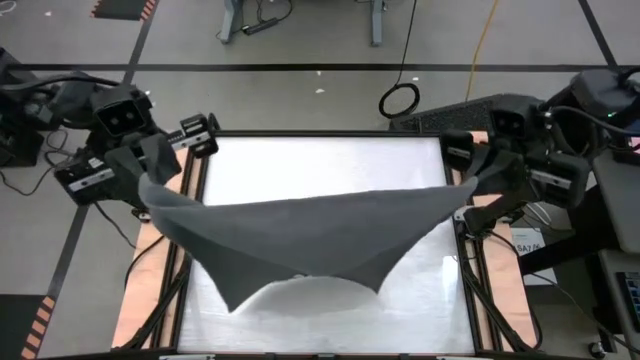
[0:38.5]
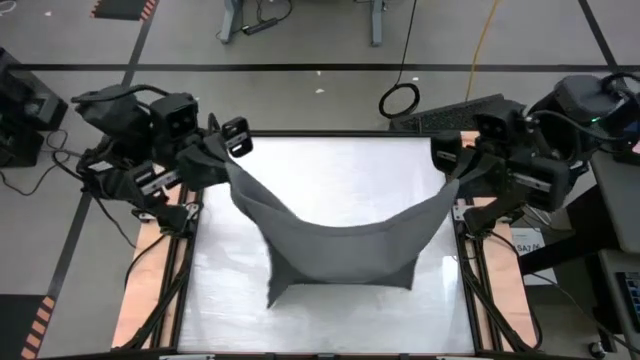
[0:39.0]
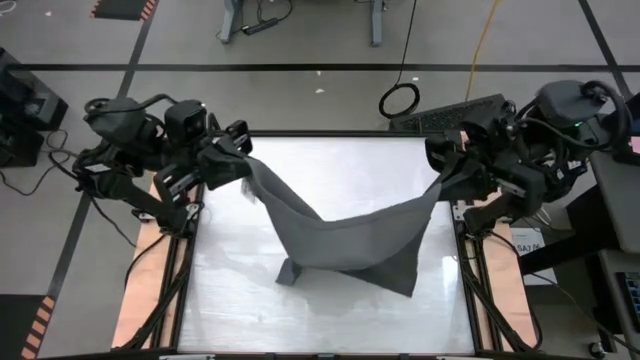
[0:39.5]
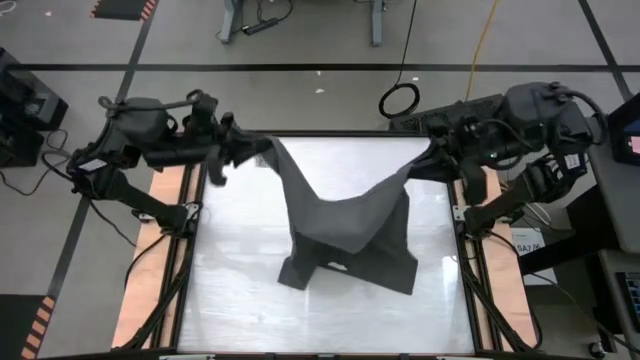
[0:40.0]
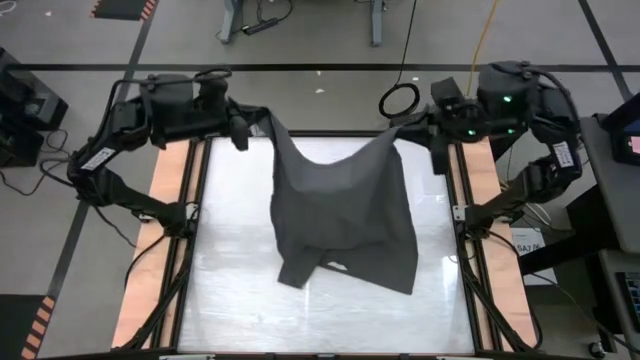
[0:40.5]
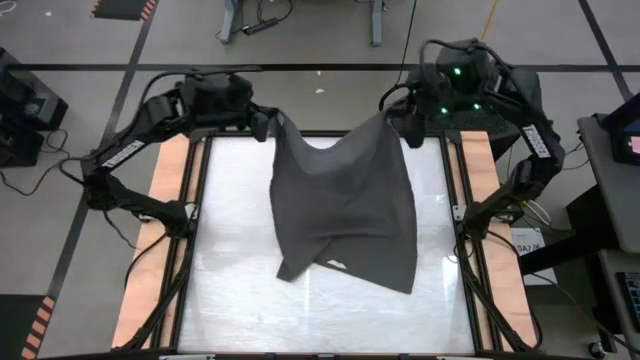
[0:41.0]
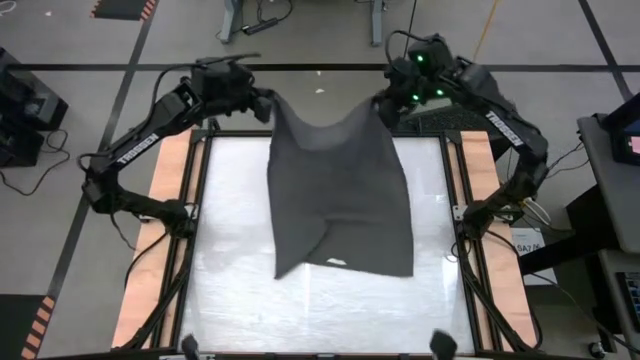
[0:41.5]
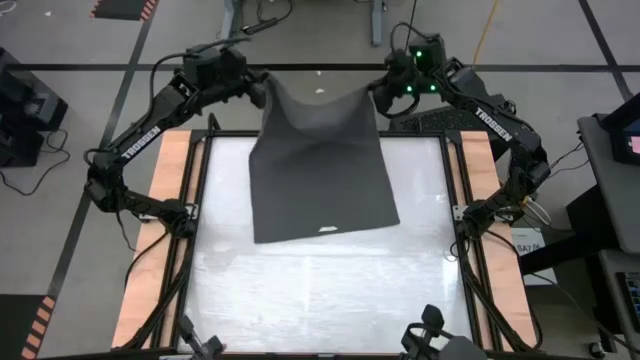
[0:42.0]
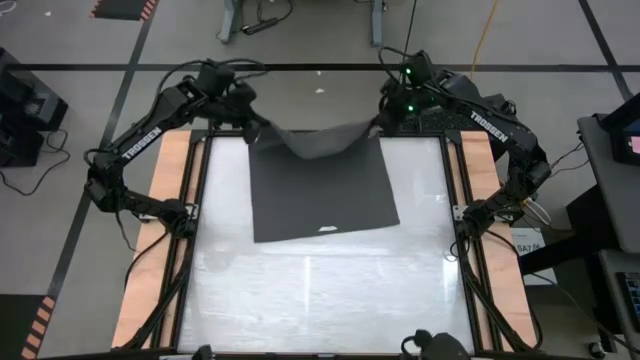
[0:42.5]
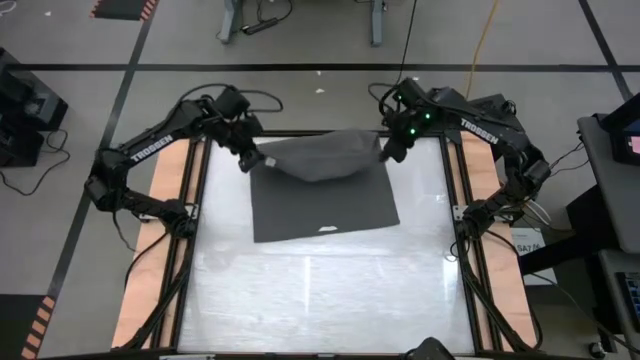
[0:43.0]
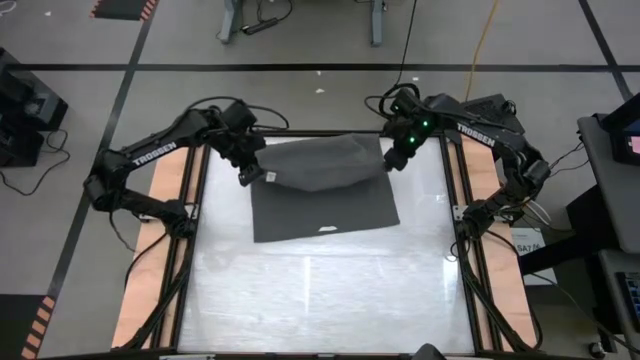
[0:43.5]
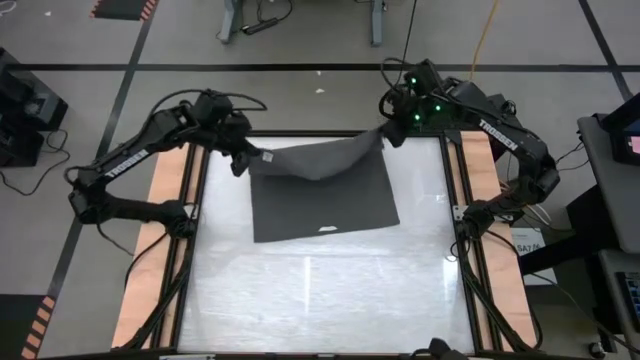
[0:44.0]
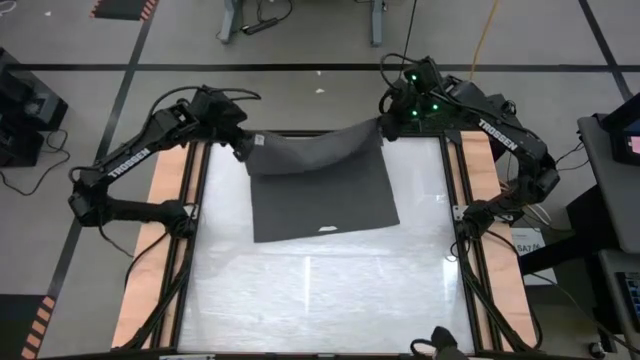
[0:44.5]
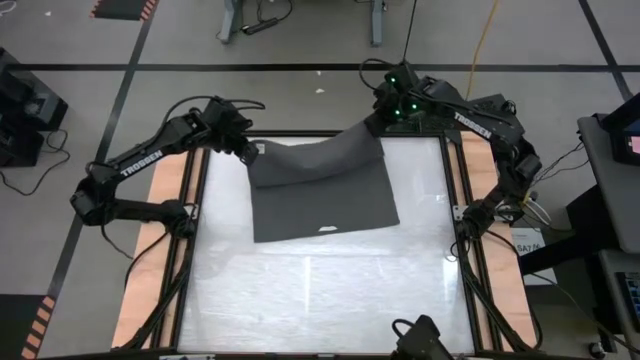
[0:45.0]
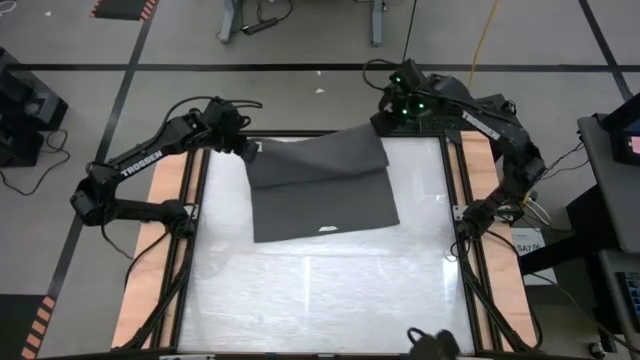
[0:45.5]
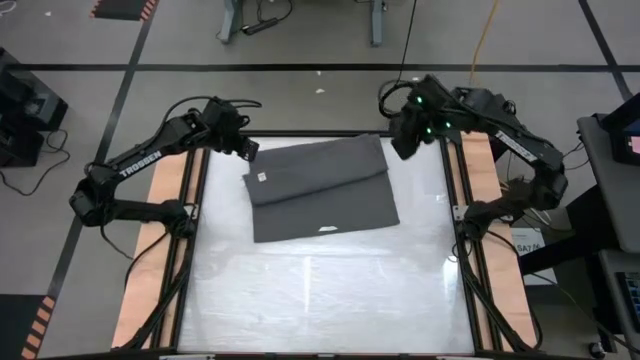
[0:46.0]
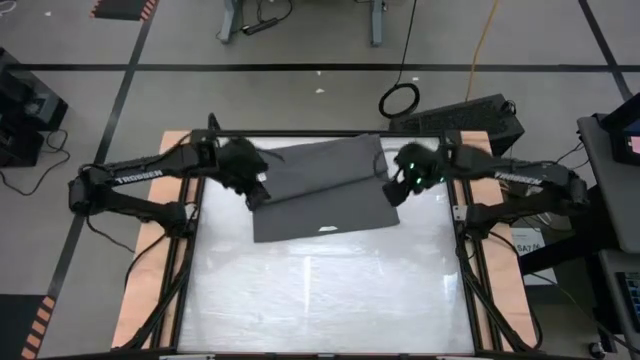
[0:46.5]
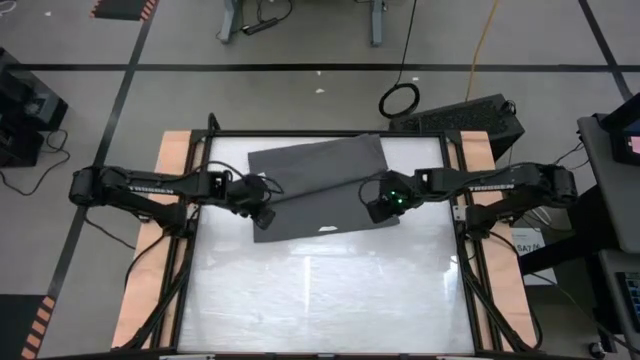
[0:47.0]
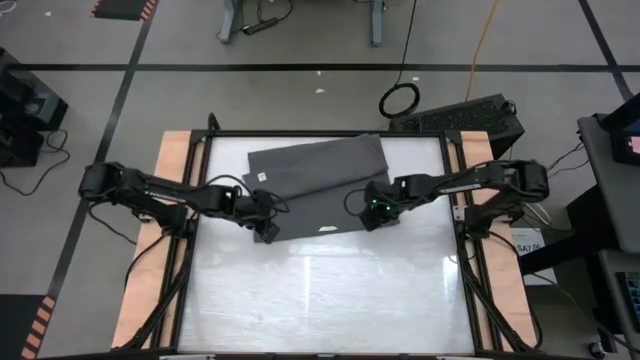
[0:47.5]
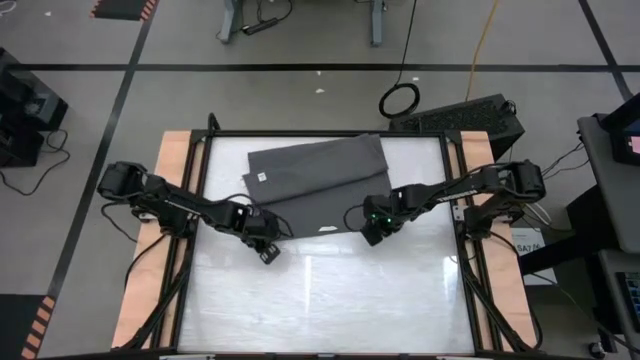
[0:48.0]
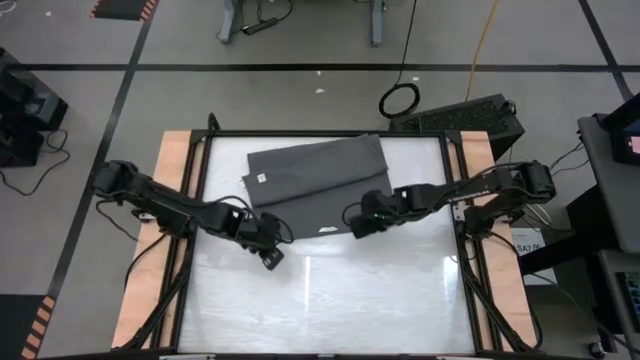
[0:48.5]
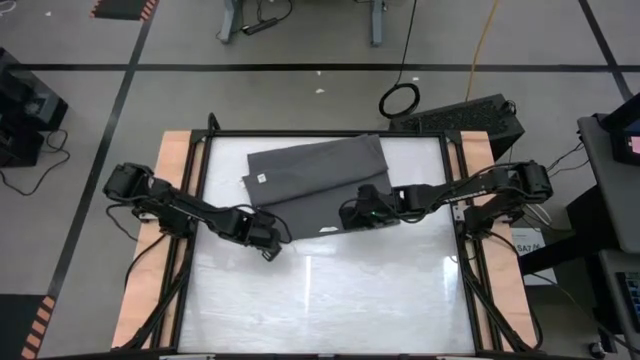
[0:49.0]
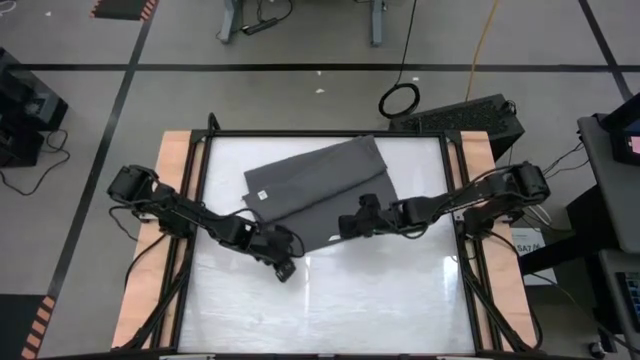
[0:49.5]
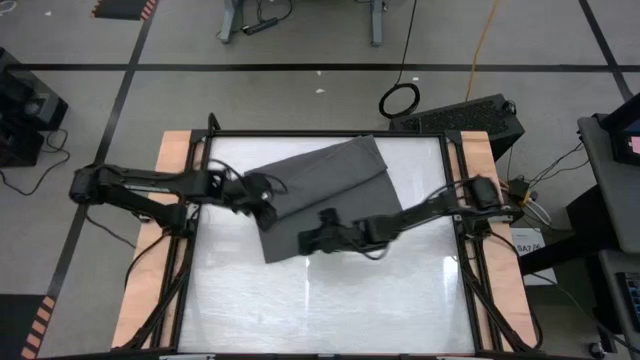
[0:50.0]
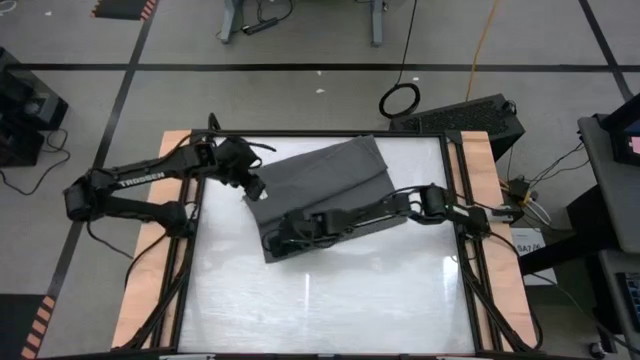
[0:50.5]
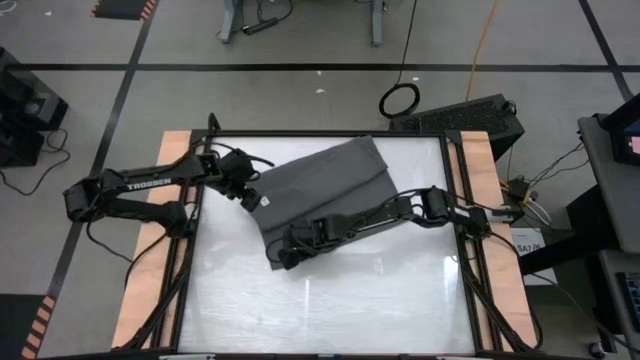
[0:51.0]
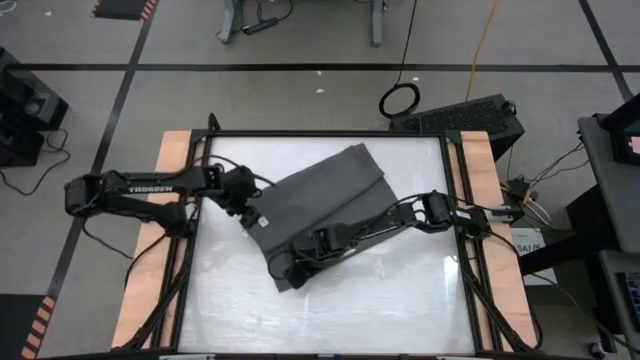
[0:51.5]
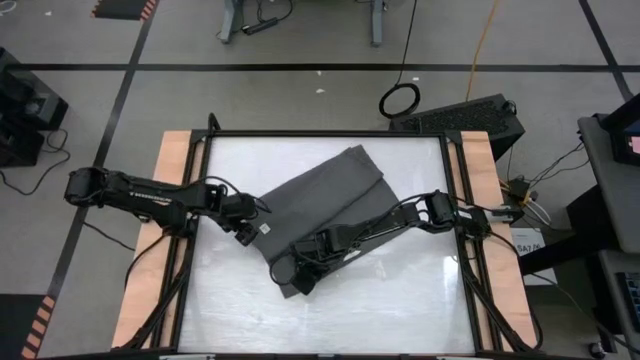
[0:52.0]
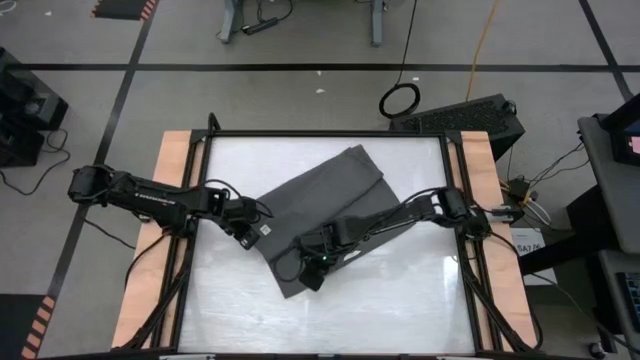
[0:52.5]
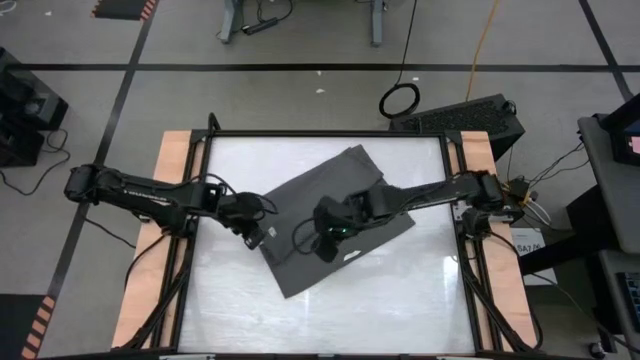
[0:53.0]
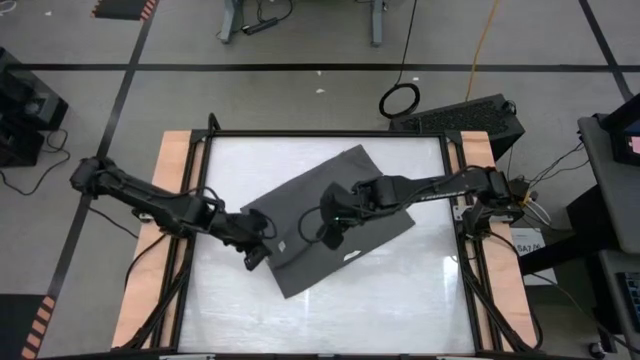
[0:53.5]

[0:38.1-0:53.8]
Task: Roll towel into tight, uniform cylinder
Roll the gray towel

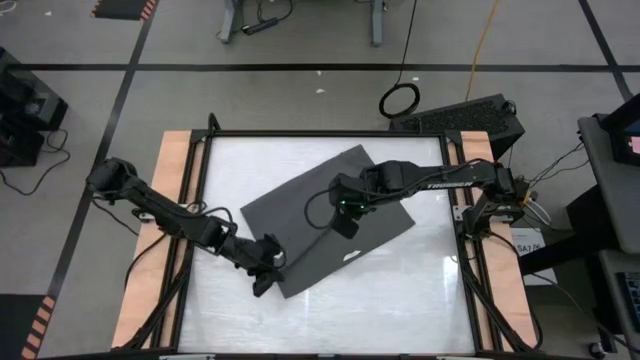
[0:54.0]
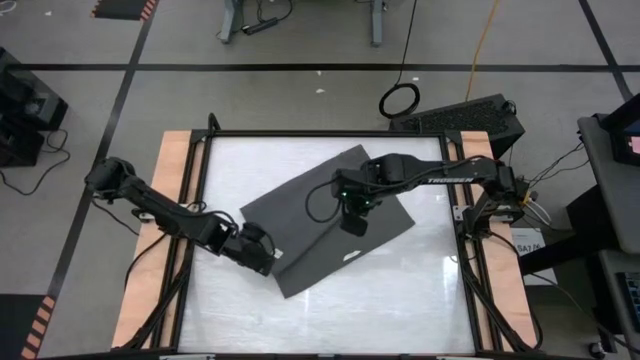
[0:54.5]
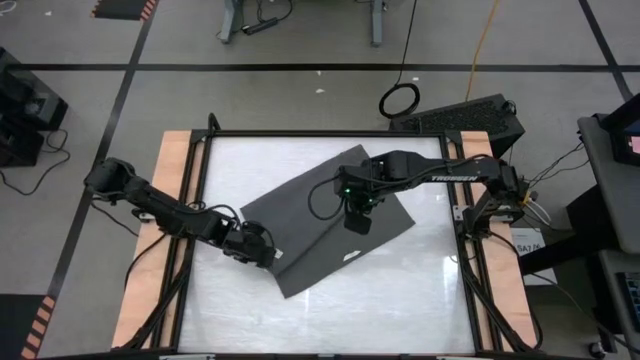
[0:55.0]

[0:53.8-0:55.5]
Roll the gray towel
